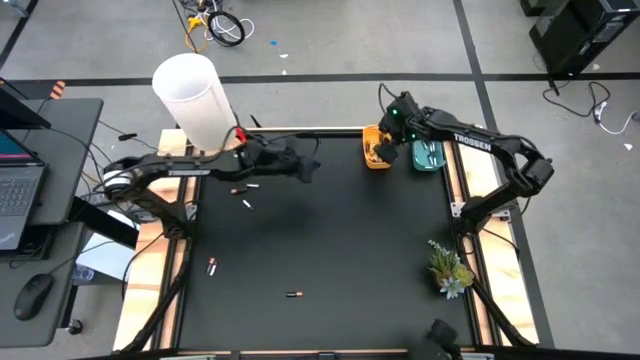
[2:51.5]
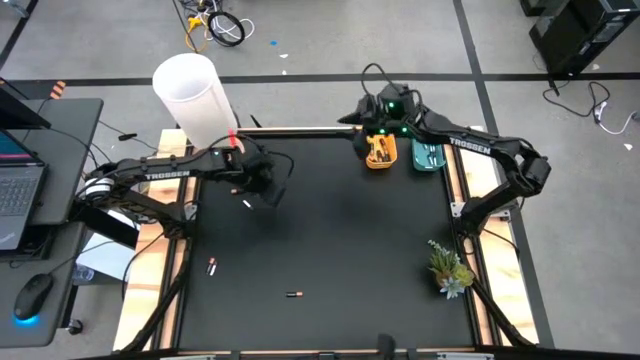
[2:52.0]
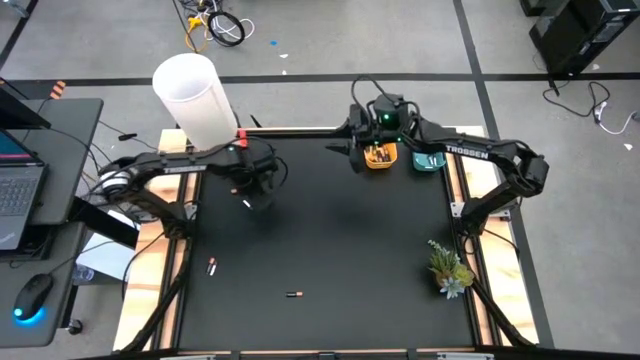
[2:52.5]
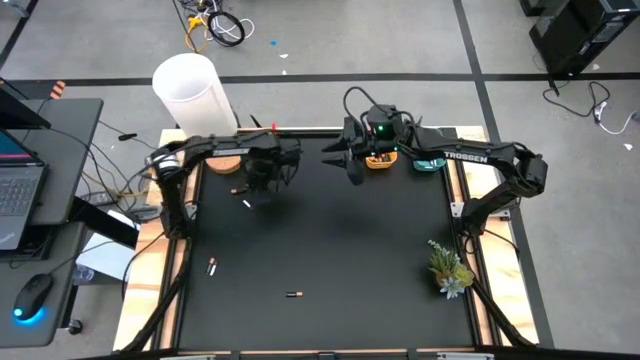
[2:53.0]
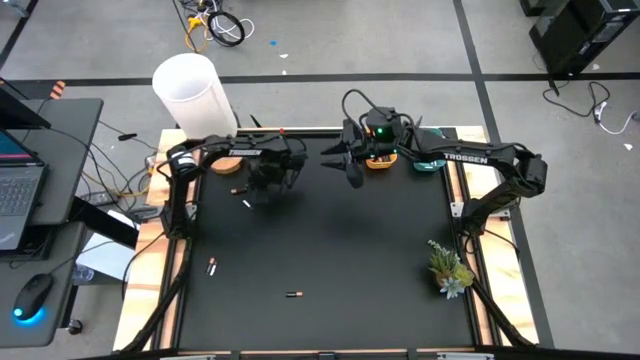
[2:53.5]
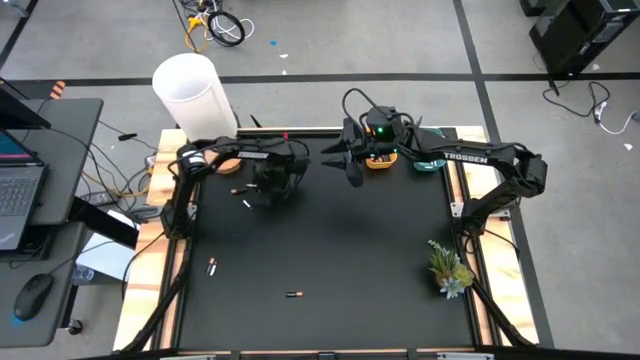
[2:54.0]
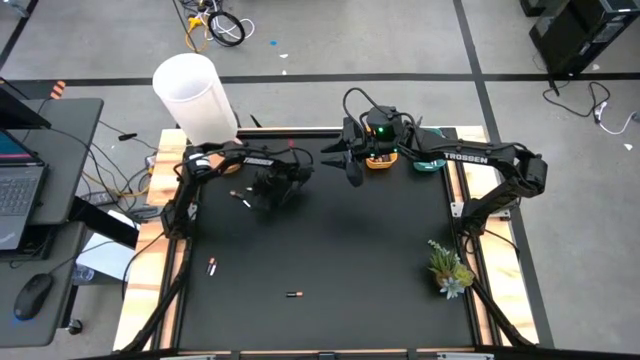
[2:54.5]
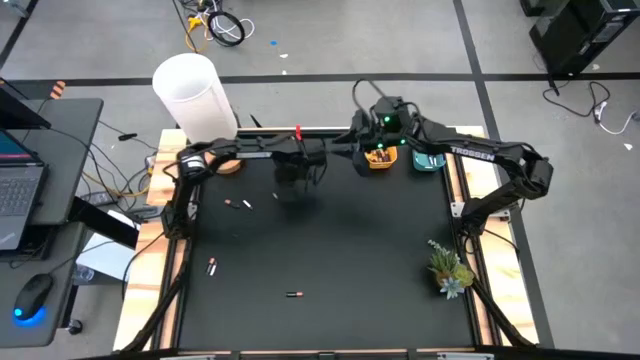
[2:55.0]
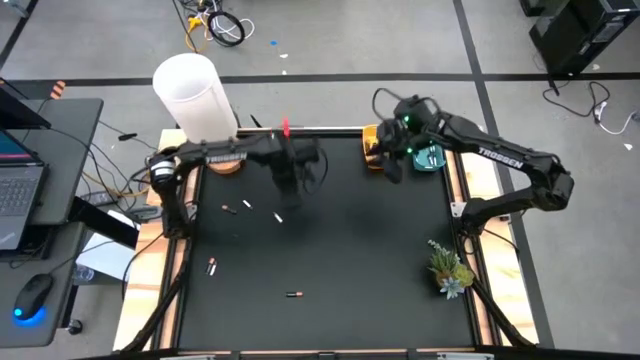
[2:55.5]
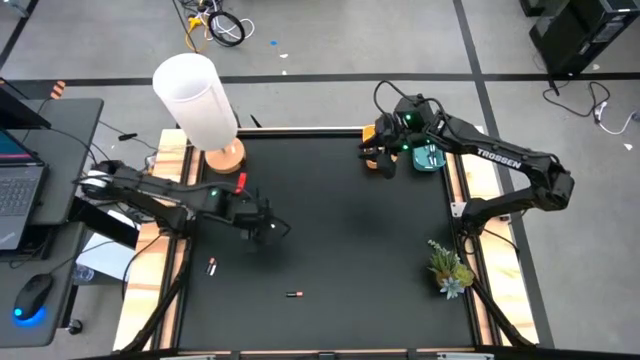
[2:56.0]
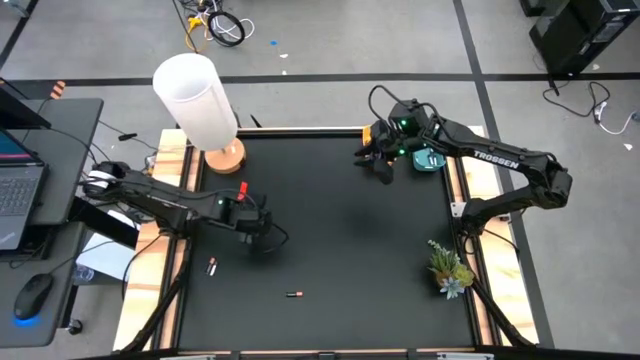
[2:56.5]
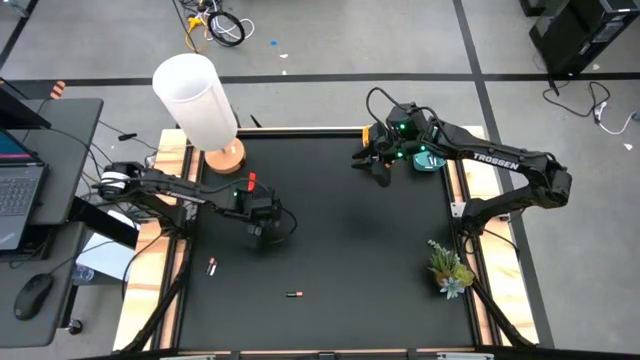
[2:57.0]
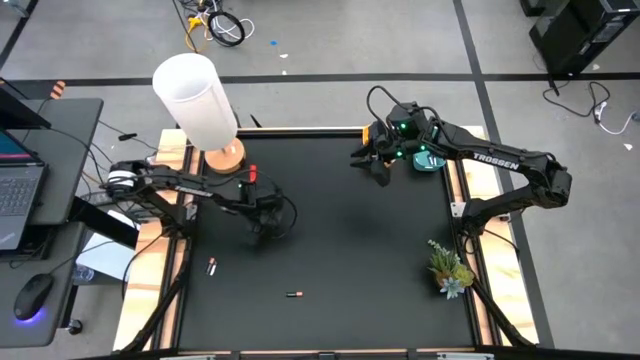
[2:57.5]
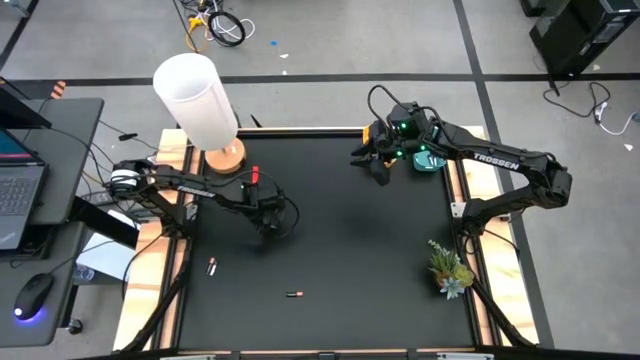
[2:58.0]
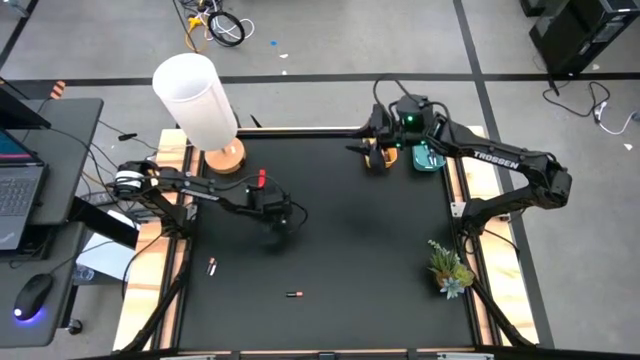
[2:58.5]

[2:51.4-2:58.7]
Task: Sort batteries
Put the top silver battery into the blue bin

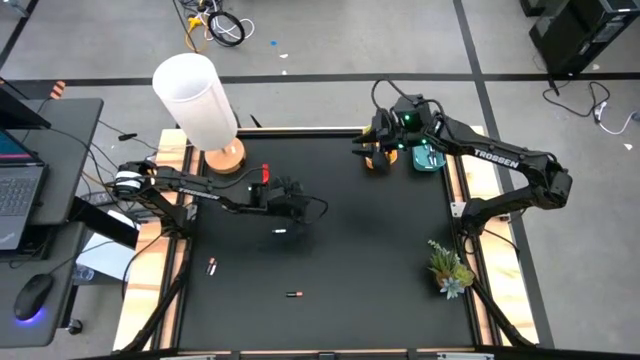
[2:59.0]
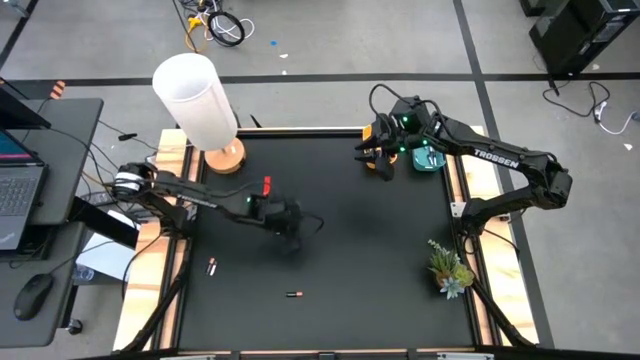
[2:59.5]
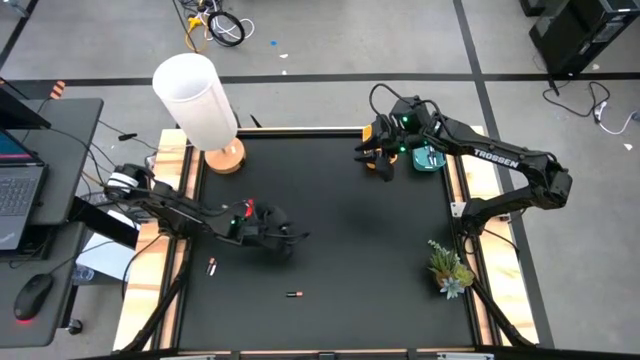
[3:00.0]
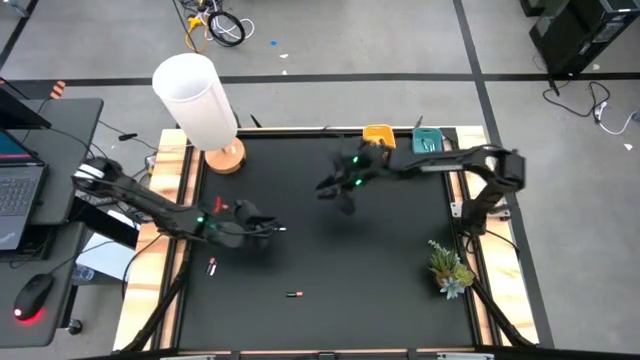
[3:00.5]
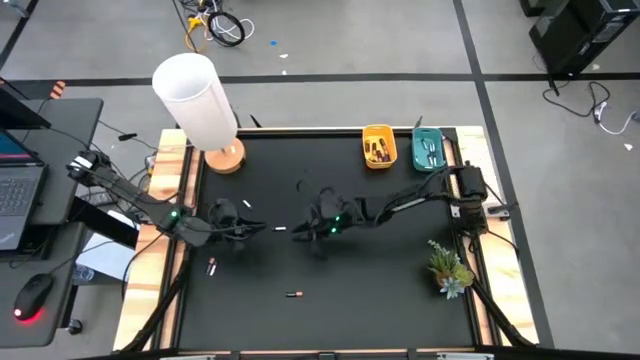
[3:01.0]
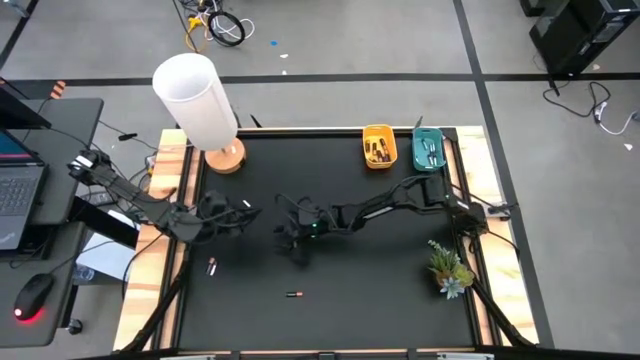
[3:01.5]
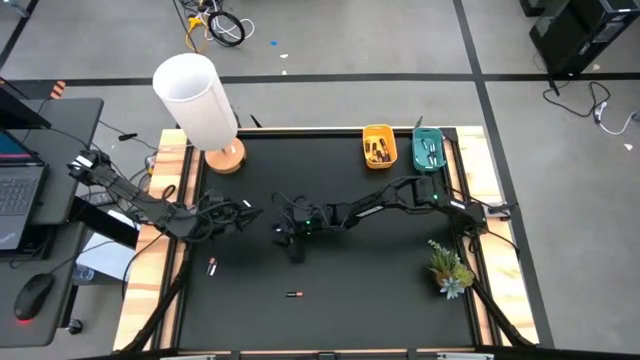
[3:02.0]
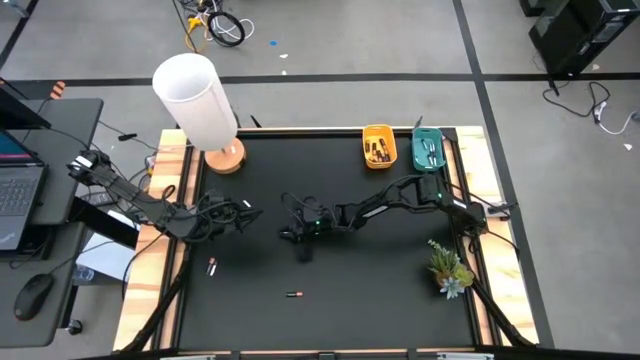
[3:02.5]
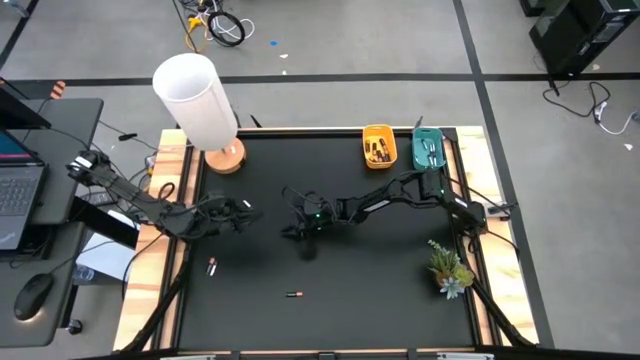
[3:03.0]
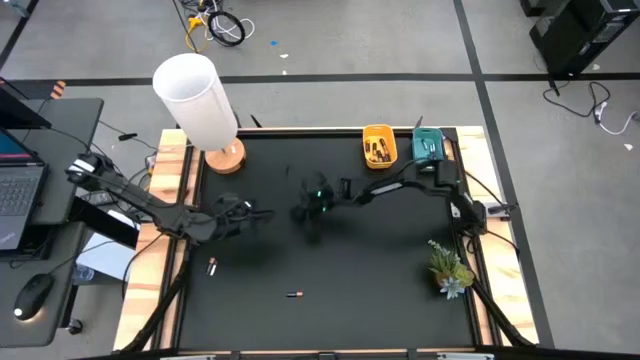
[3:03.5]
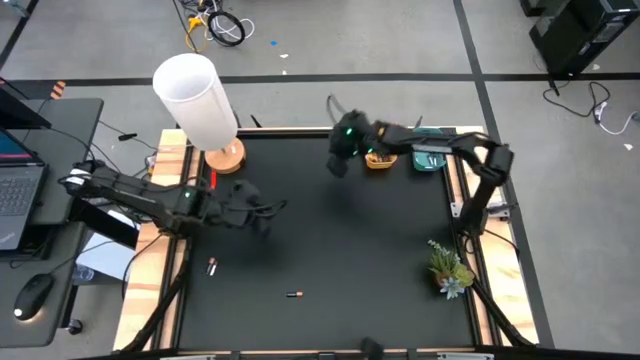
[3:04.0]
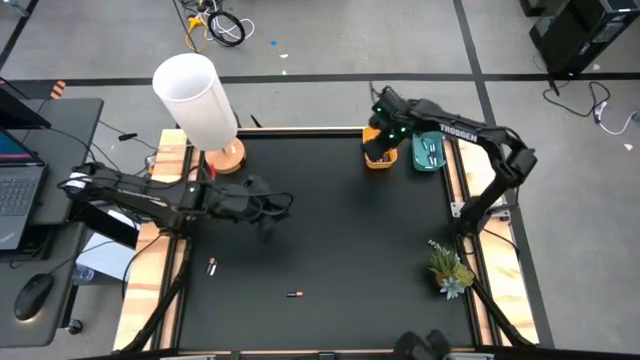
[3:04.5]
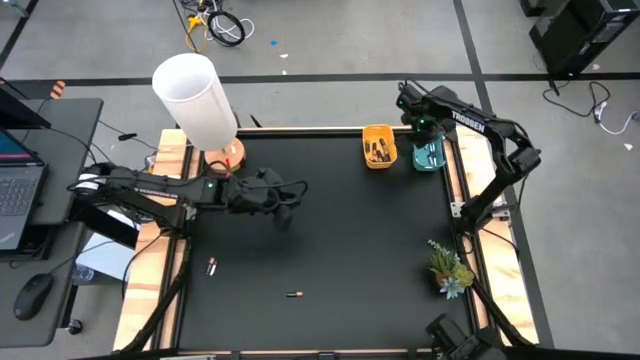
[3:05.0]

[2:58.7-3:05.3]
Put the middle silver battery into the blue bin

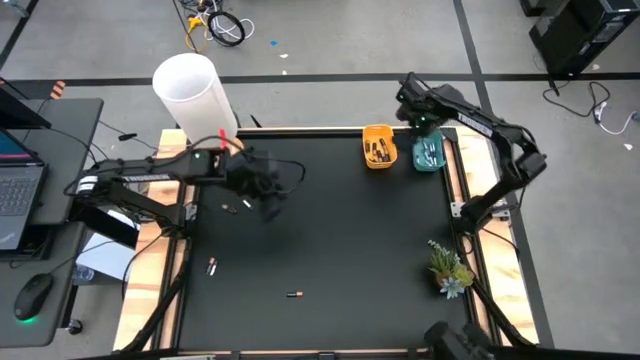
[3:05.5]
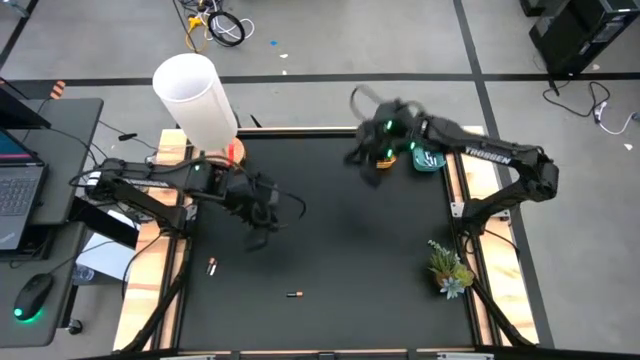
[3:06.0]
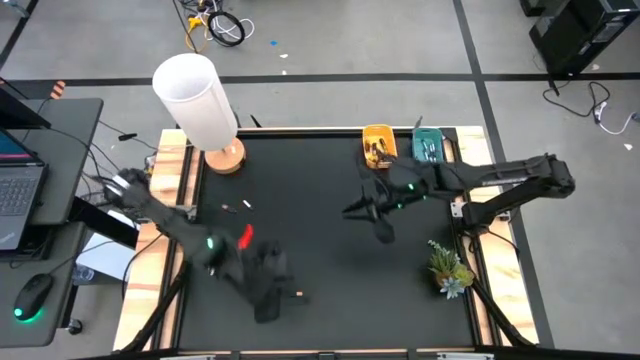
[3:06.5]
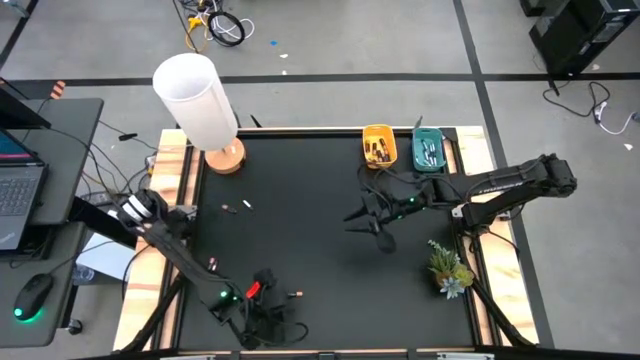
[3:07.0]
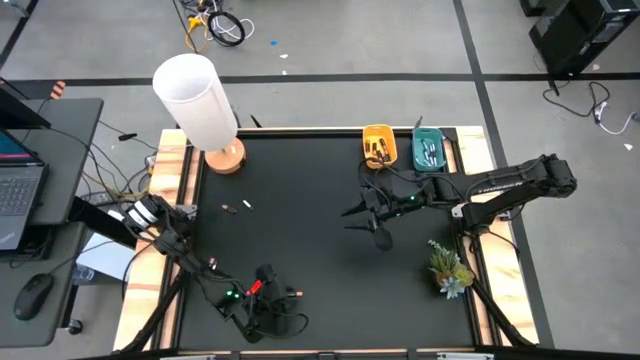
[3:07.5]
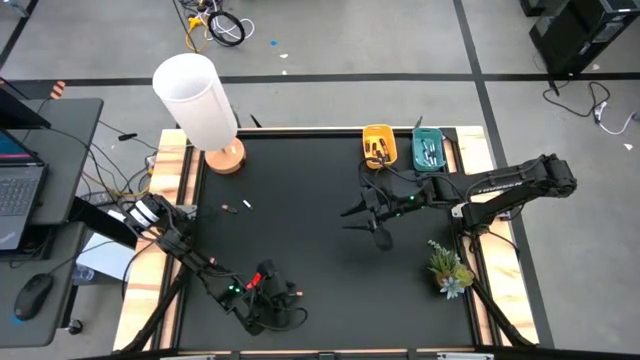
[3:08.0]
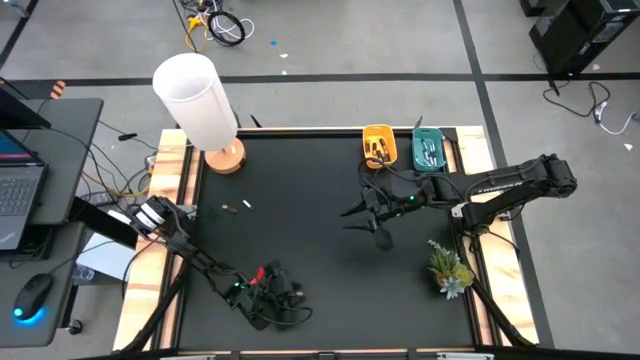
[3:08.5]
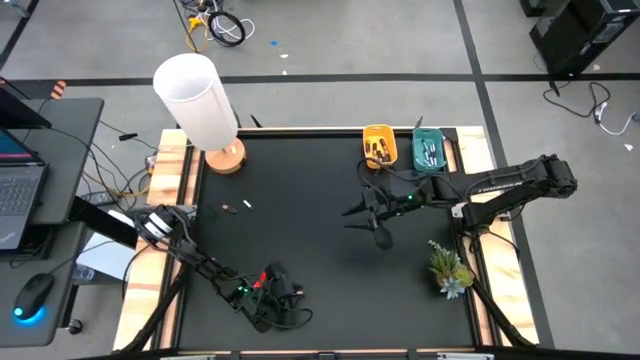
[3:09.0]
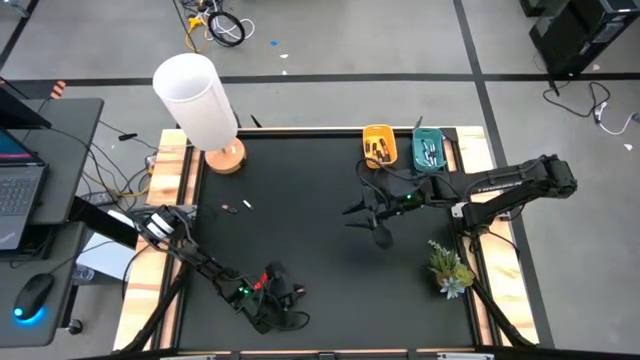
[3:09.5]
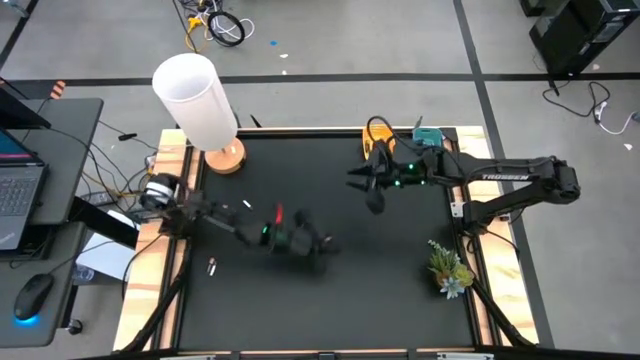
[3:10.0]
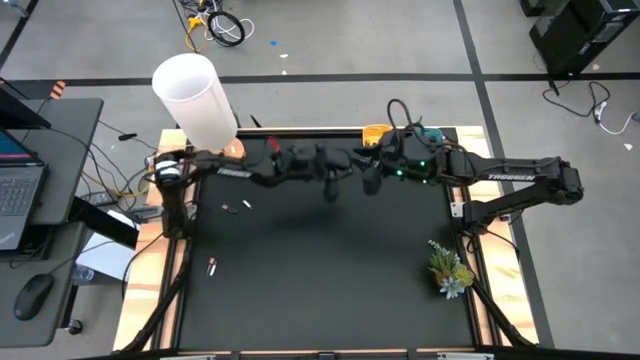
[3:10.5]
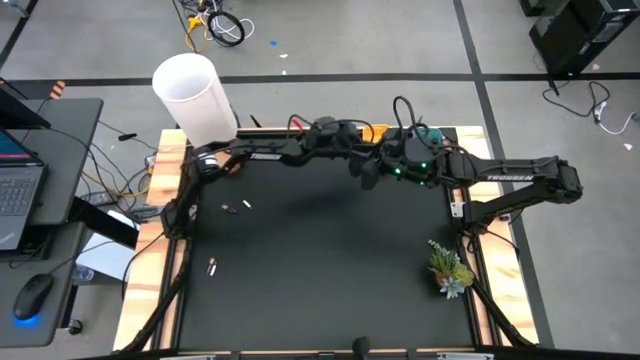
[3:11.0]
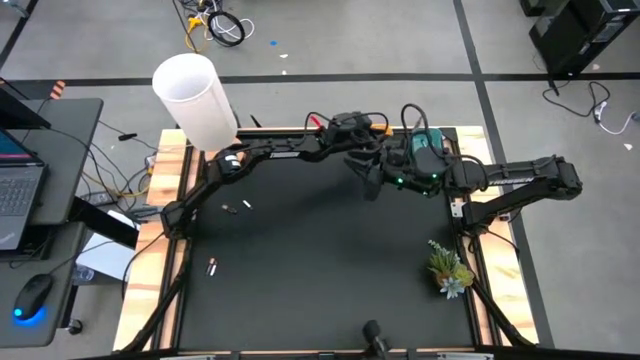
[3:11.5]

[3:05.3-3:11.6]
Put the bottom black battery into the yellow bin
